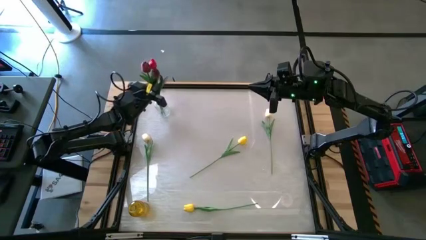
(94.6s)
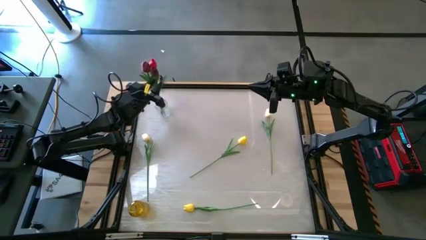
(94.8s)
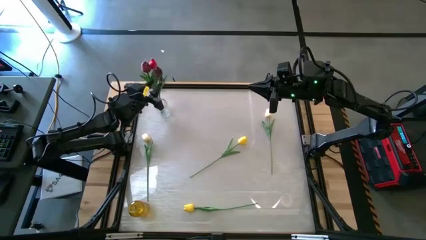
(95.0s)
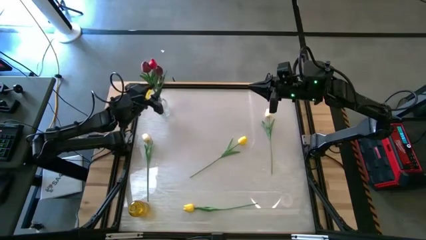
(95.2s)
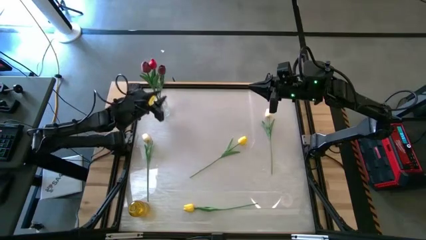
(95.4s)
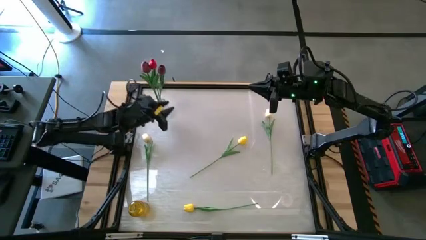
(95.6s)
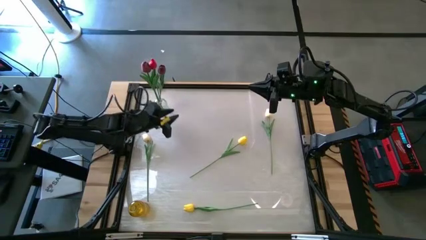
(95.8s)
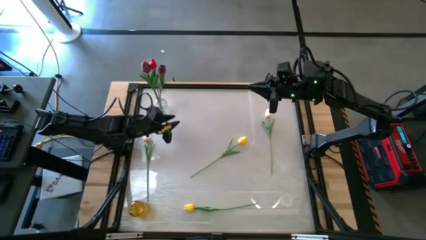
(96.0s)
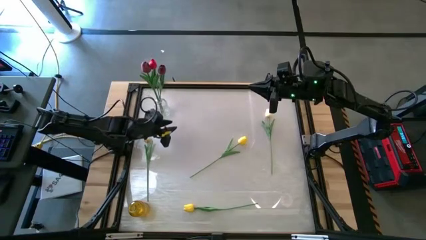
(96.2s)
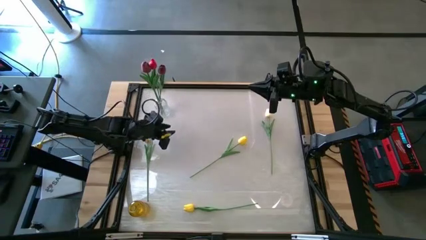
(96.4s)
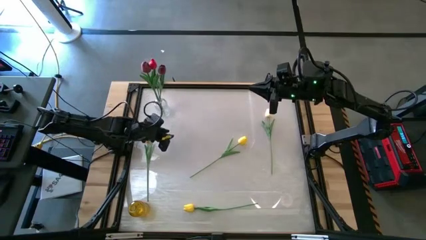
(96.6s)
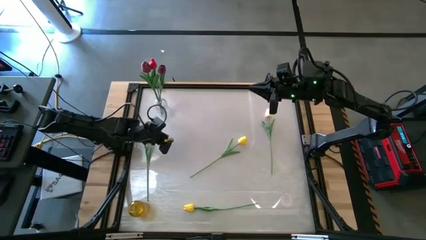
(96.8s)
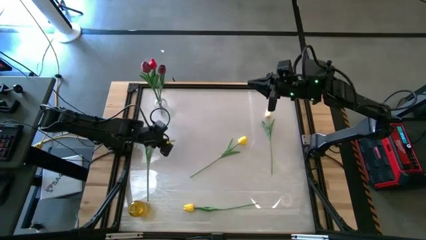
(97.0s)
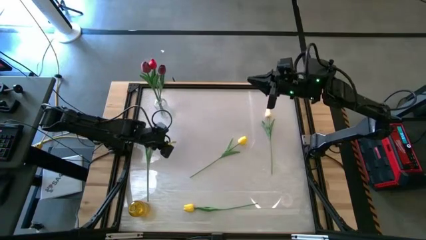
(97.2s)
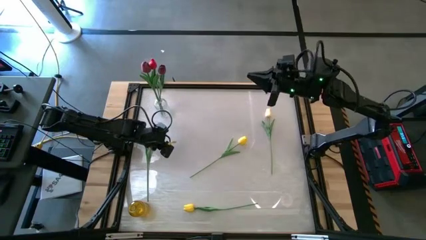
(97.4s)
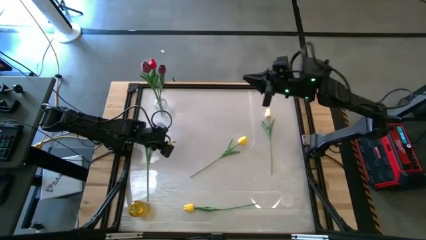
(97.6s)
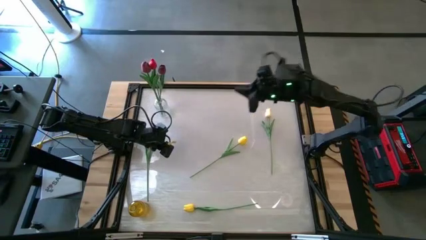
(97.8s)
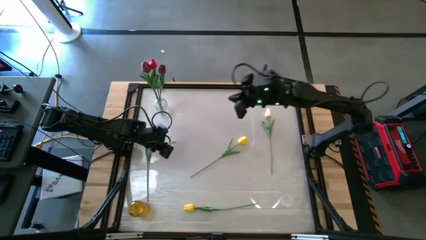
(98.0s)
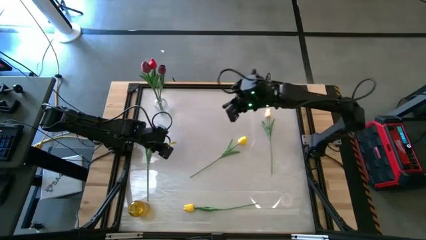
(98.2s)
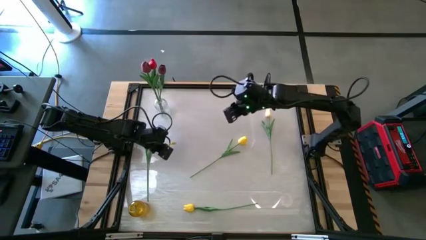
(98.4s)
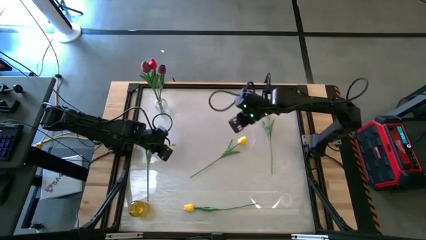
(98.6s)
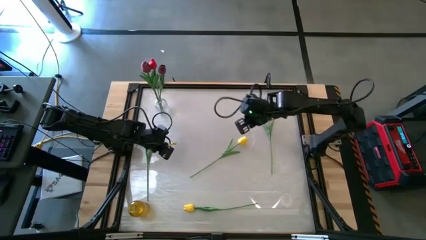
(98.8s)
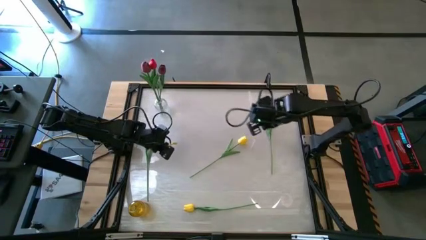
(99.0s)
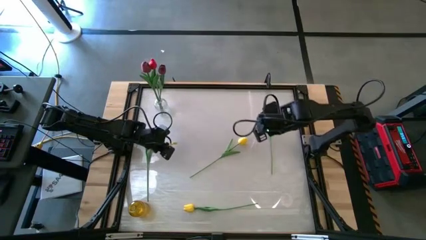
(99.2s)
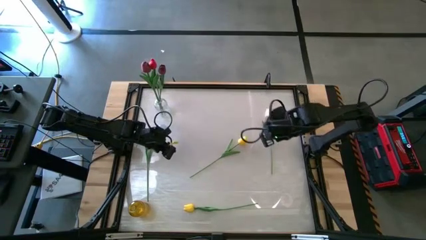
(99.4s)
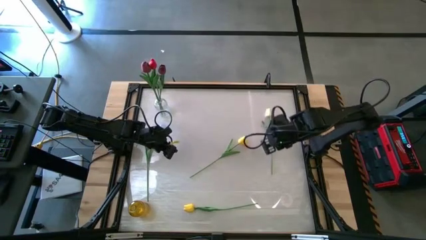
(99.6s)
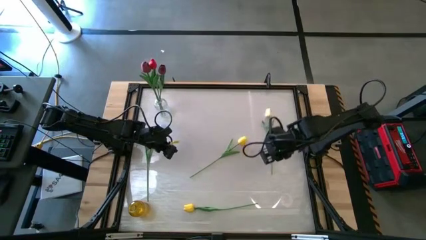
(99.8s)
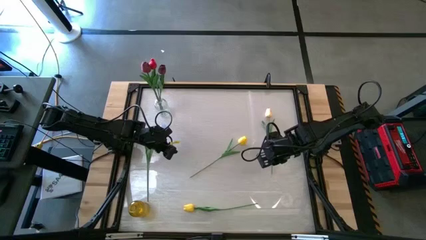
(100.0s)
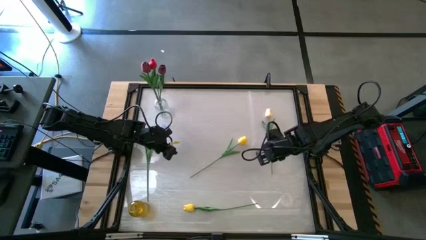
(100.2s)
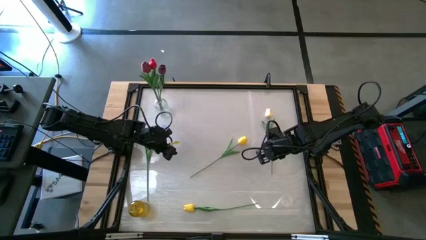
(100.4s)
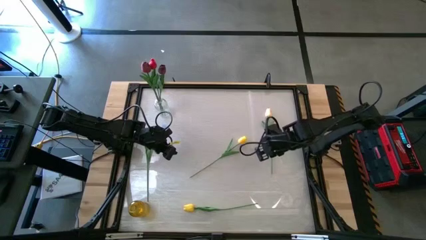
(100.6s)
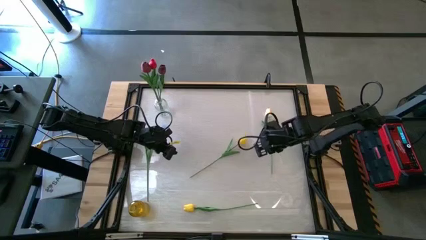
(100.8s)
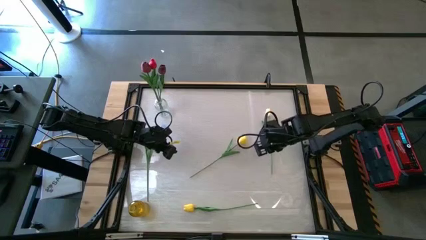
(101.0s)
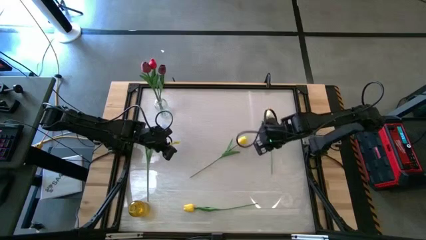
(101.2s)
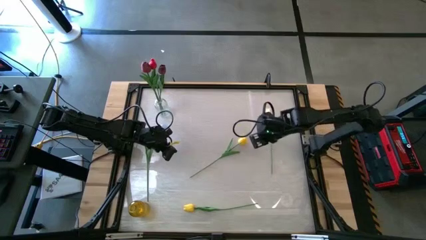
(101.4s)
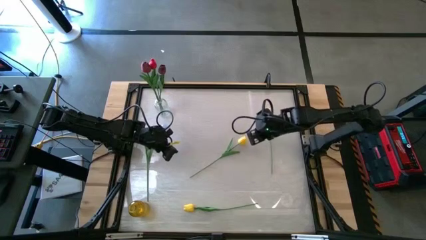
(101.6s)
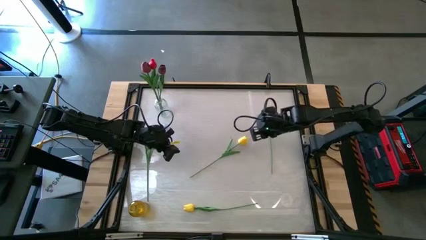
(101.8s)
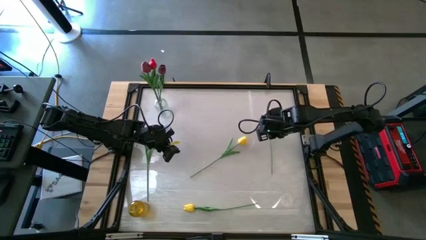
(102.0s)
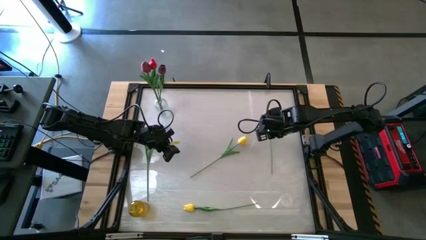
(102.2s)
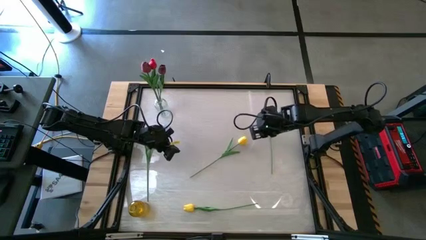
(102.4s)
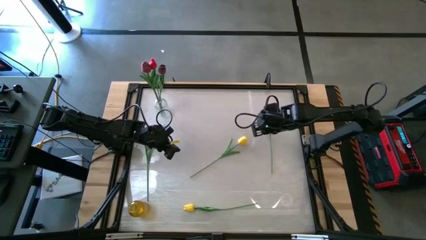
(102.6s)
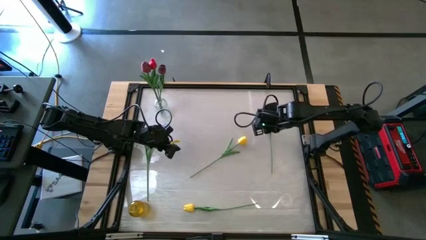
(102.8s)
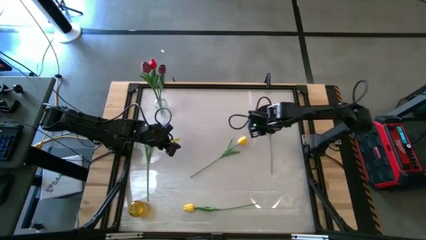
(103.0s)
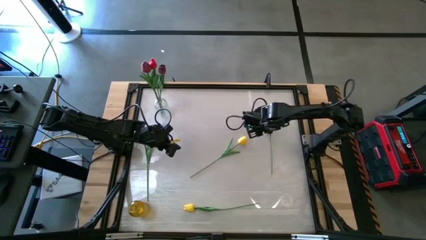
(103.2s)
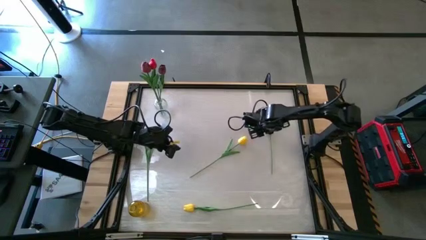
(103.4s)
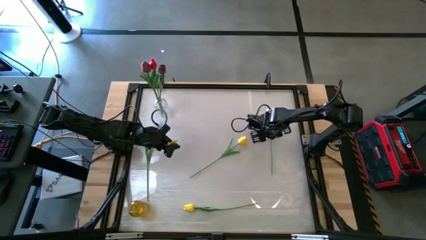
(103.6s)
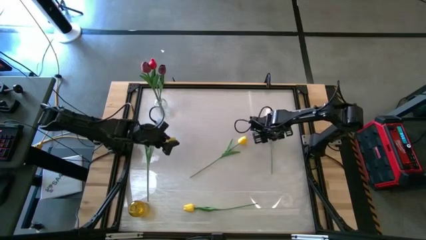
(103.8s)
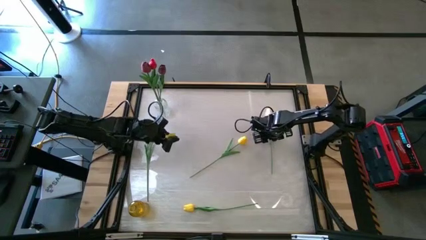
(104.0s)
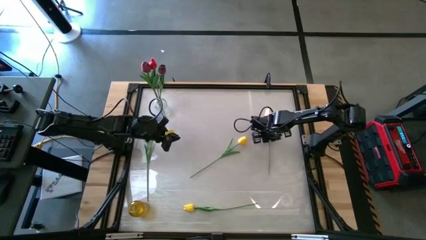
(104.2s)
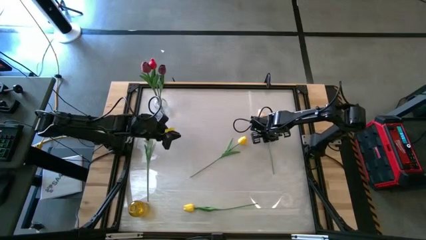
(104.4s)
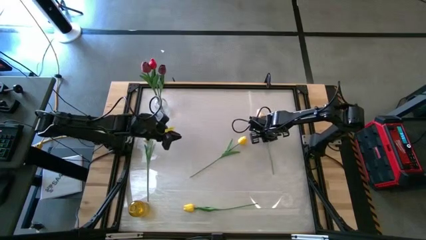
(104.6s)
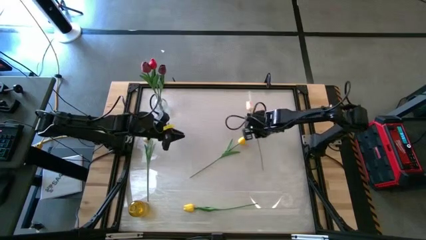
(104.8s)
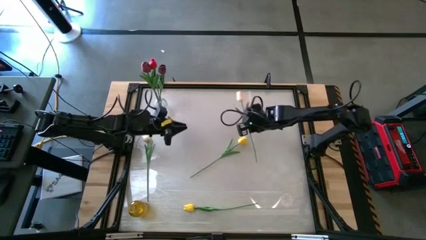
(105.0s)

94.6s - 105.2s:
Task: Sort flowers into vase by color
Put the right white flower into the yellow vase

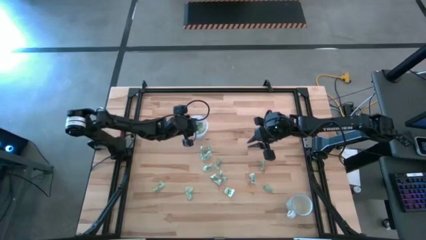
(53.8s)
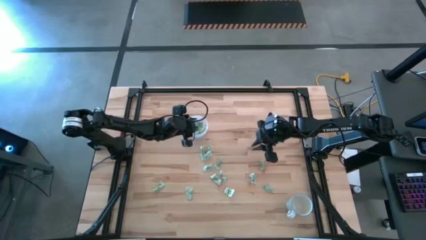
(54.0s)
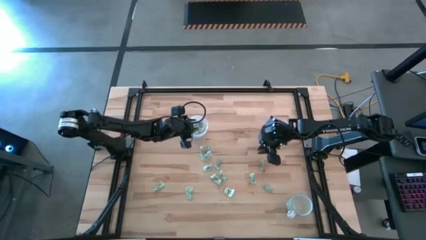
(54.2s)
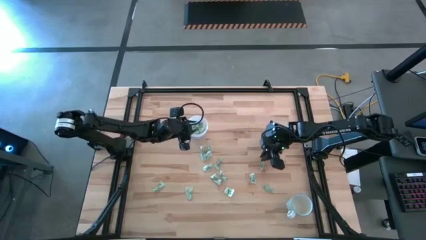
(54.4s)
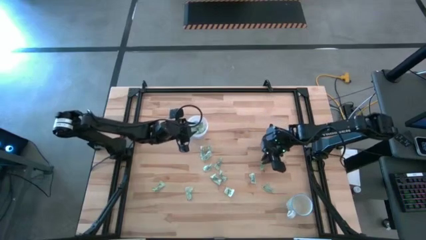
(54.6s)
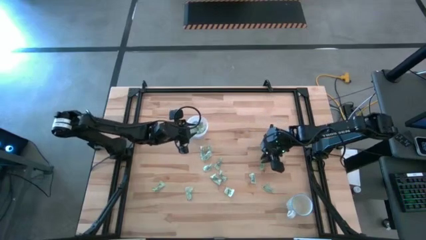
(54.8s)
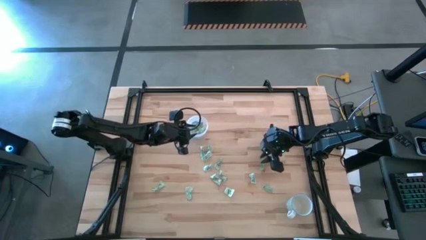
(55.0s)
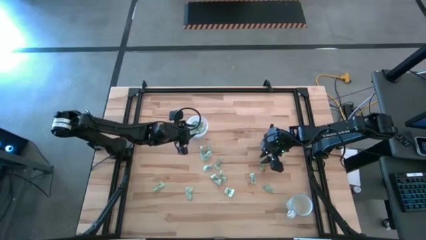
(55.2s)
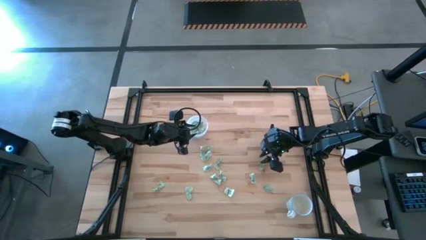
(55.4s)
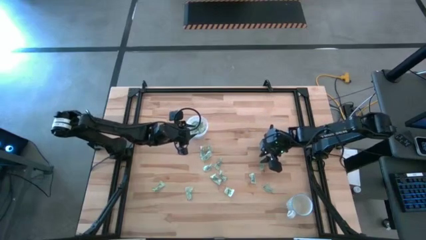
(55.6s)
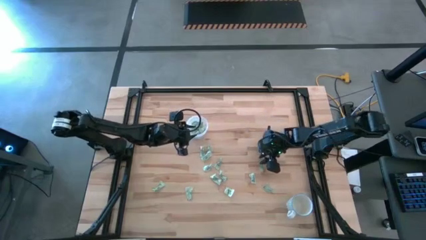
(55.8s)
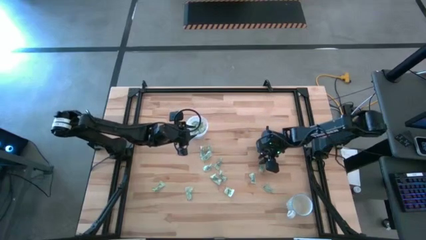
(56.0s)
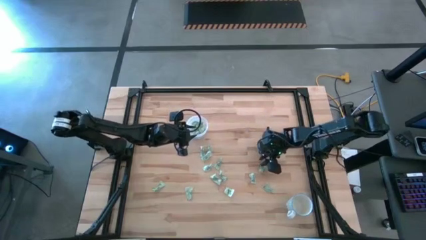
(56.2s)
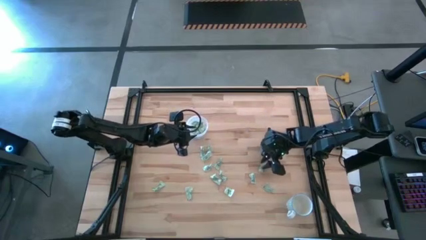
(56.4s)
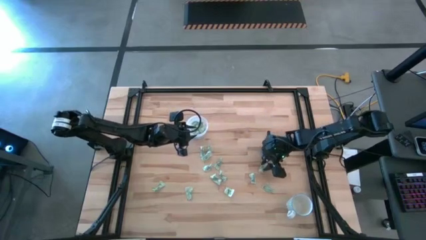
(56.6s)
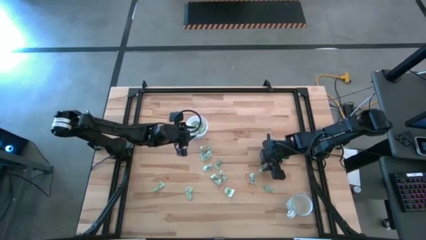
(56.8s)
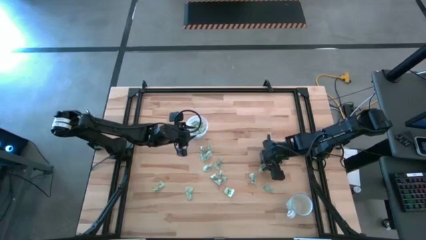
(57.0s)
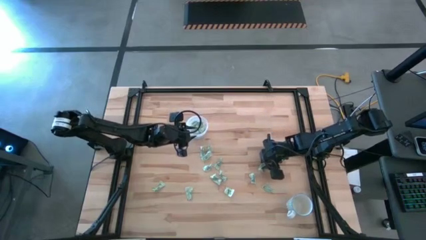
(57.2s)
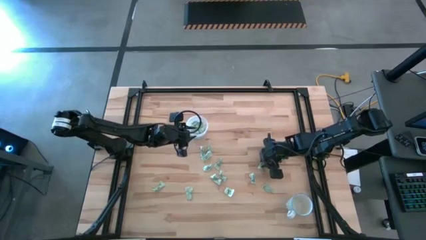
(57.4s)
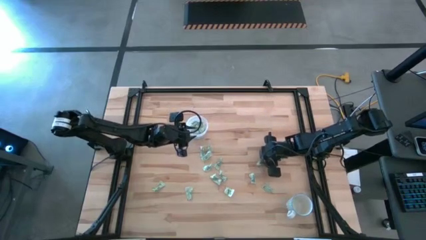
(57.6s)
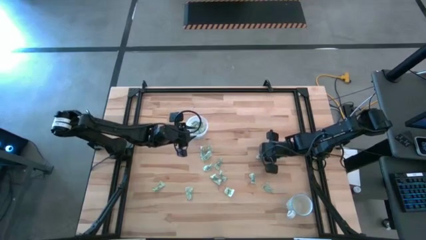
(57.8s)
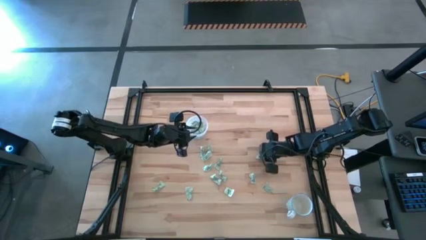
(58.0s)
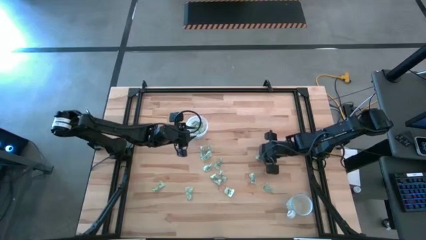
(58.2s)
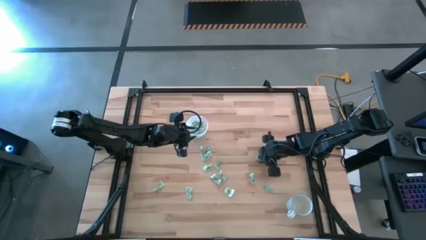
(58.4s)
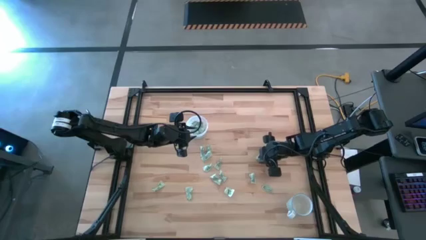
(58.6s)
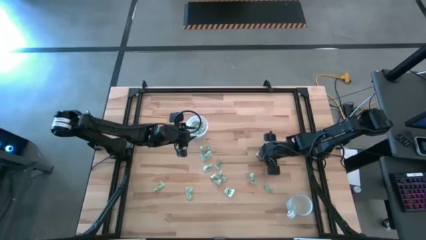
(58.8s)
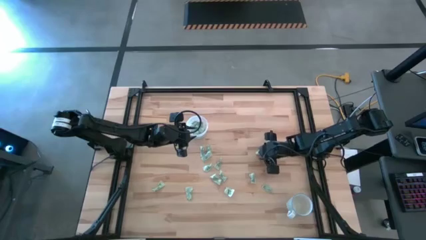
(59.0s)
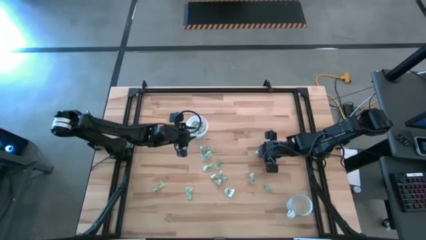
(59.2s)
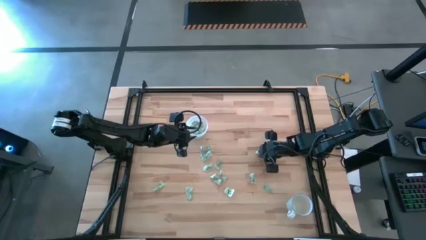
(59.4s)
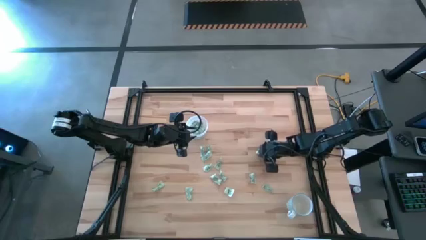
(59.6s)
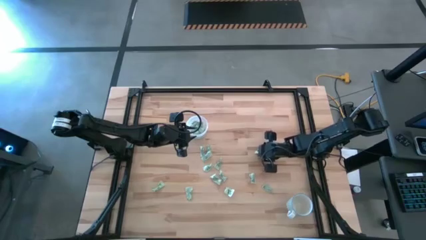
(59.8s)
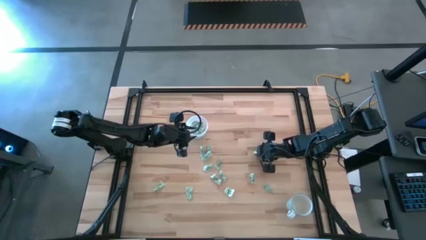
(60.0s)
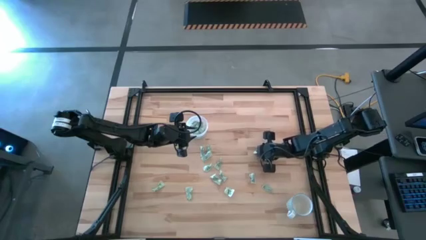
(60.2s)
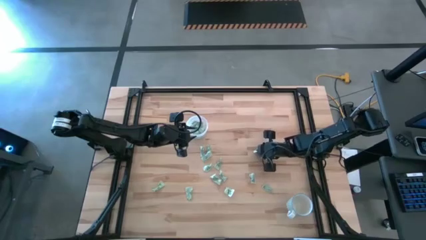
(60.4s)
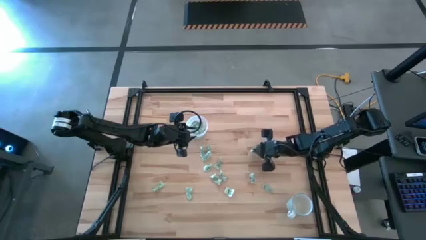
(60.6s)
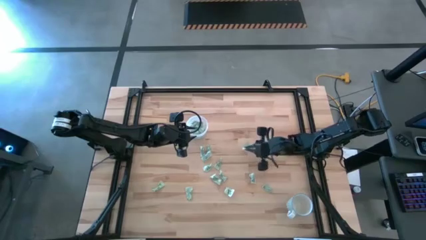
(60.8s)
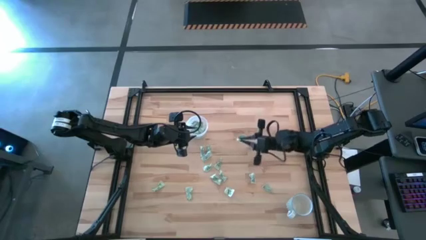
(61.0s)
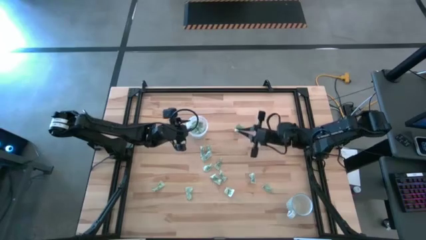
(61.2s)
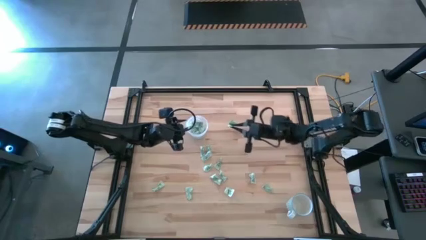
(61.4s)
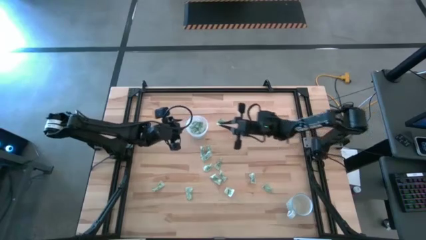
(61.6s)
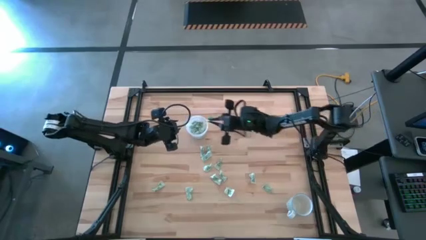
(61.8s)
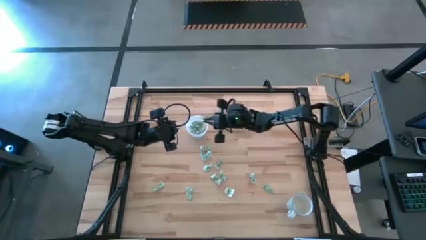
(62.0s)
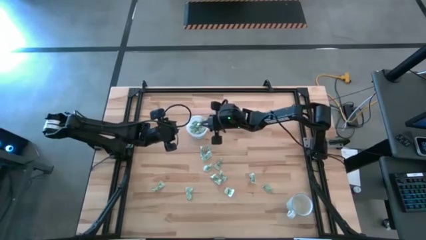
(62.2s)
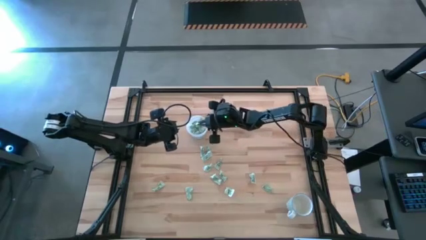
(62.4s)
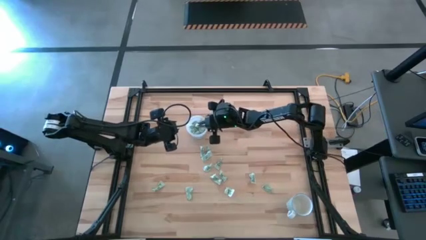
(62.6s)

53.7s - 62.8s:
Task: Pick and place Stevia / Truvia into bins
Put the stevia packet into the transparent container
